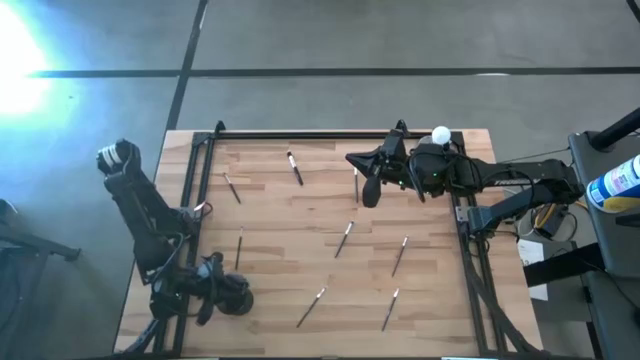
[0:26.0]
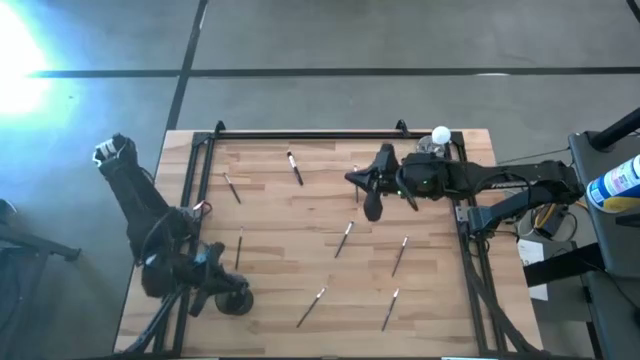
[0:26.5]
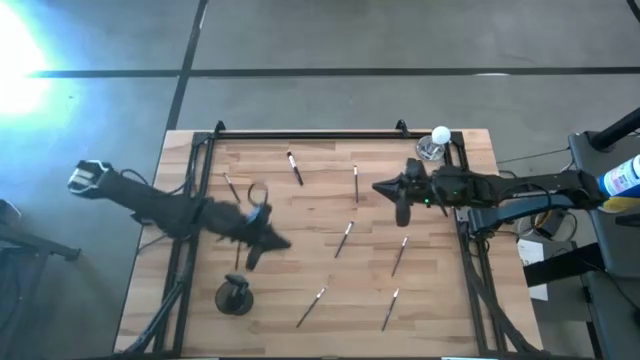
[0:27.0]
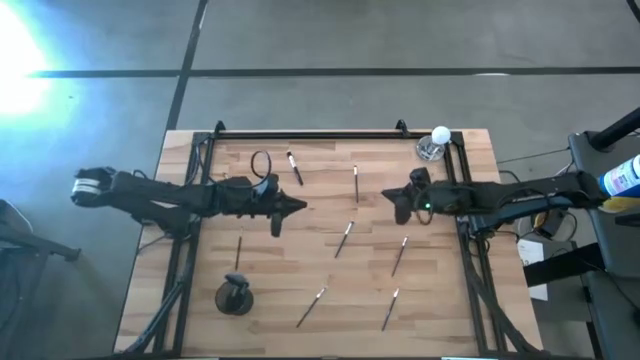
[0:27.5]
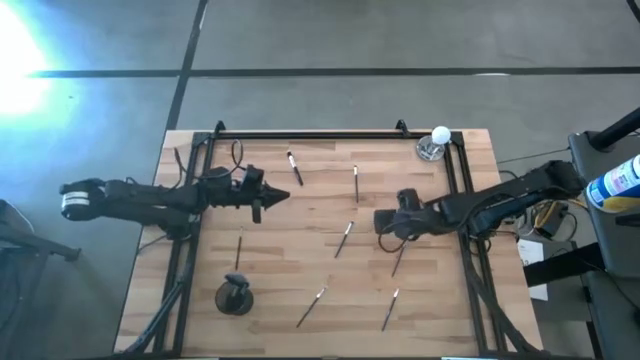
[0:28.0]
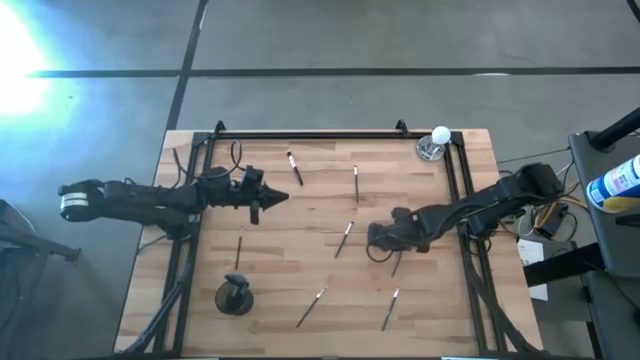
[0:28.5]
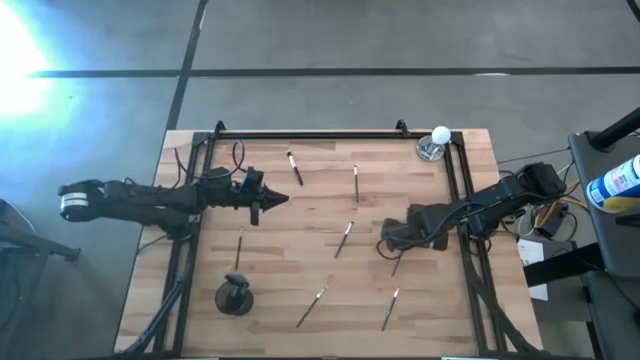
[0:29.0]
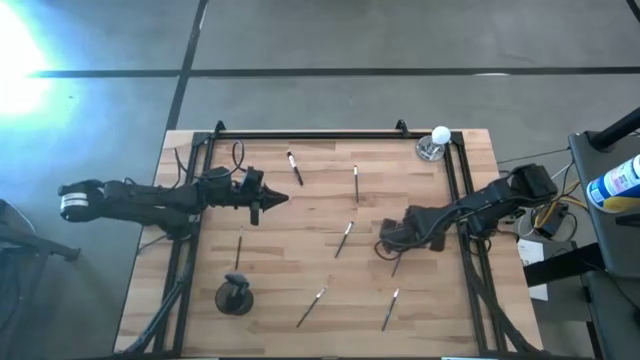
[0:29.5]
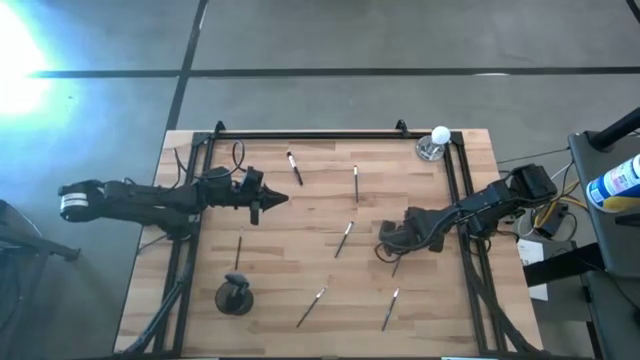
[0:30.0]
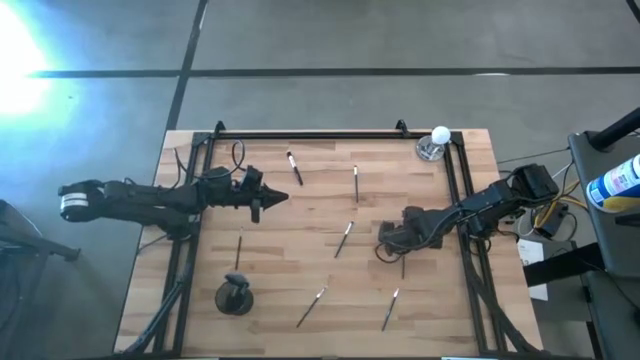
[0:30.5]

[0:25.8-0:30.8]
Task: Pick & Place Makeup Brushes
Put the eyeshadow brush into the holder

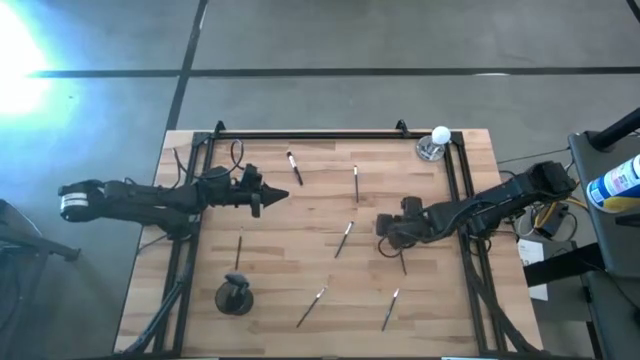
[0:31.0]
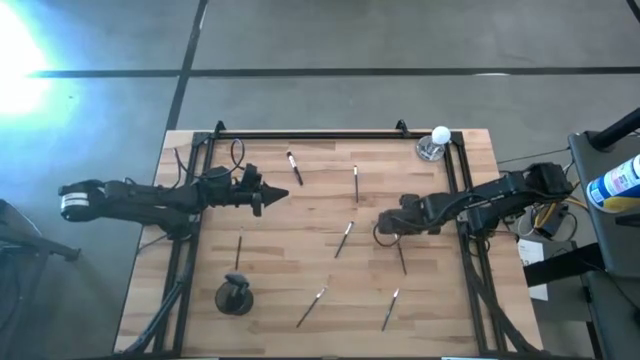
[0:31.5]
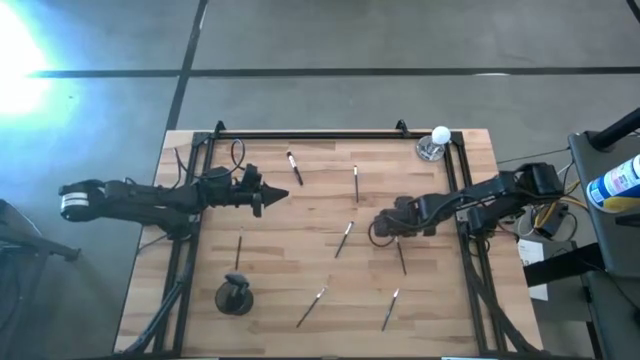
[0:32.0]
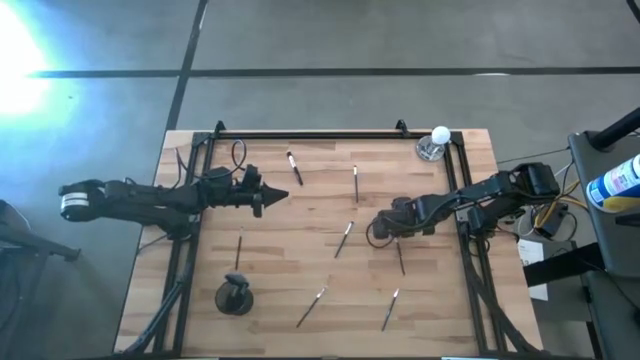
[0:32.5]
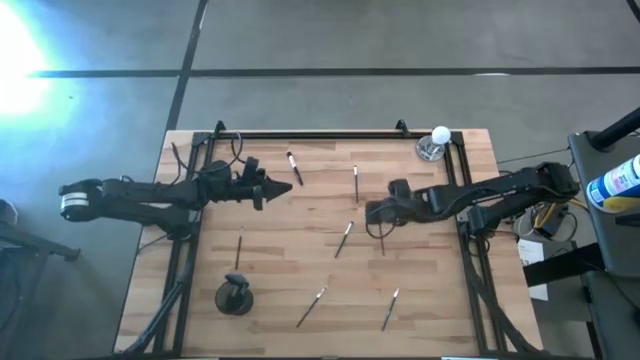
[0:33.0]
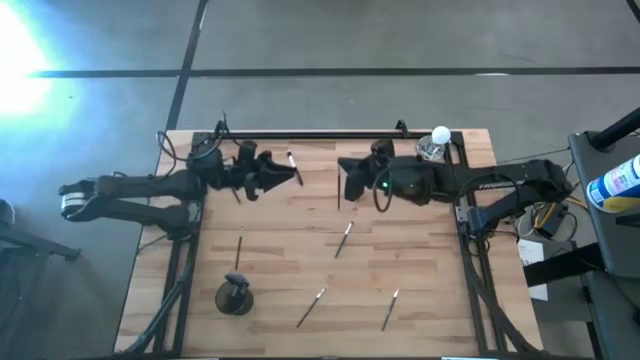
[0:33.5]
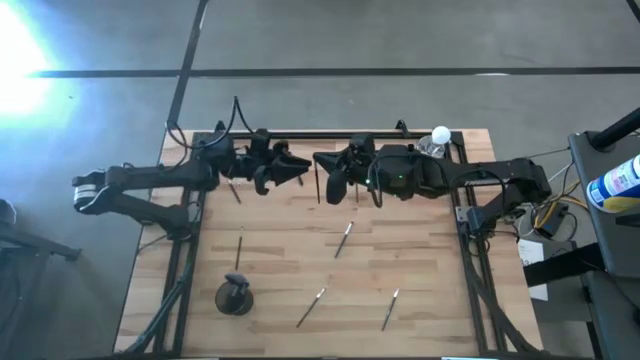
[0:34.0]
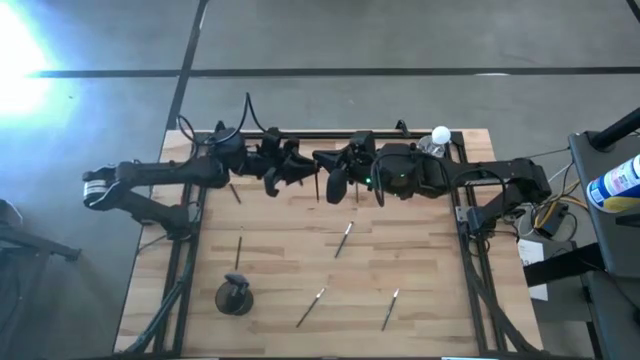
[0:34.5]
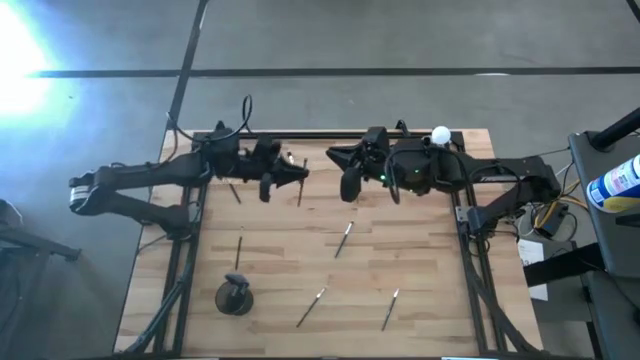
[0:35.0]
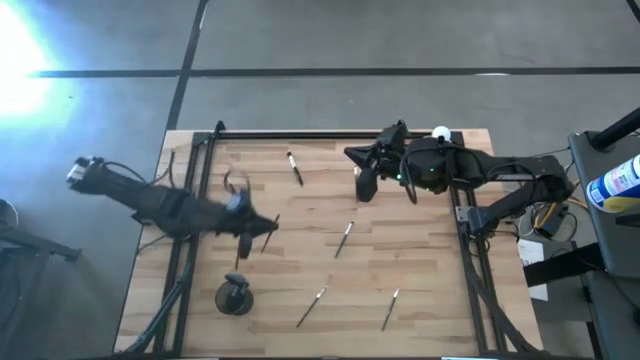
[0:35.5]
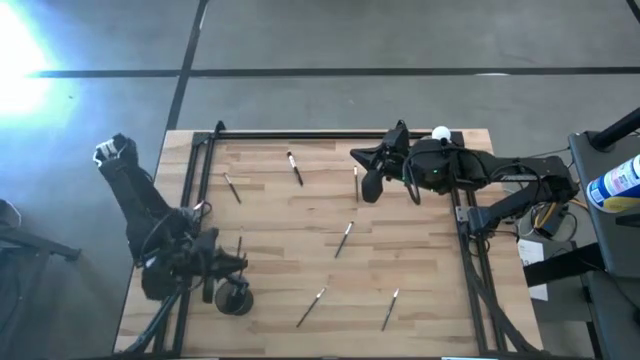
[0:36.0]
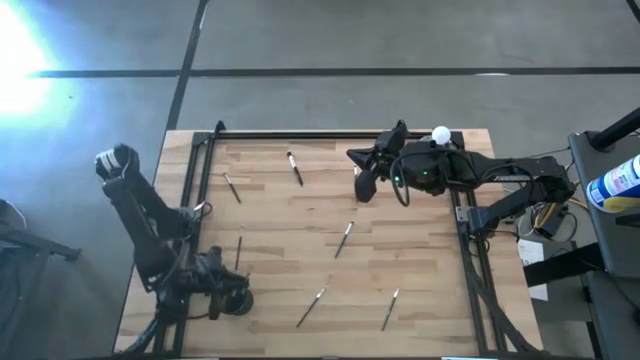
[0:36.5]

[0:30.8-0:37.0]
Put the eyeshadow brush into the holder

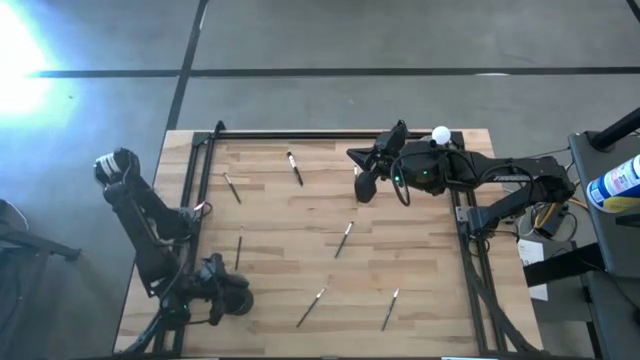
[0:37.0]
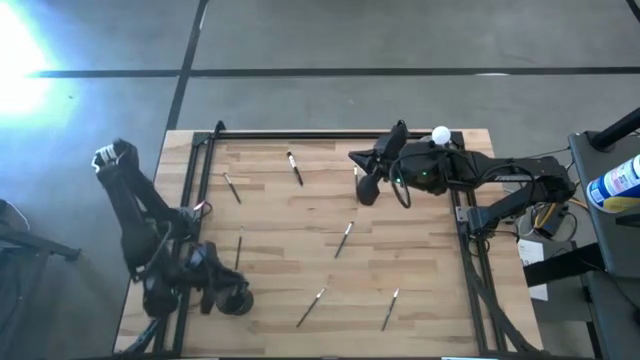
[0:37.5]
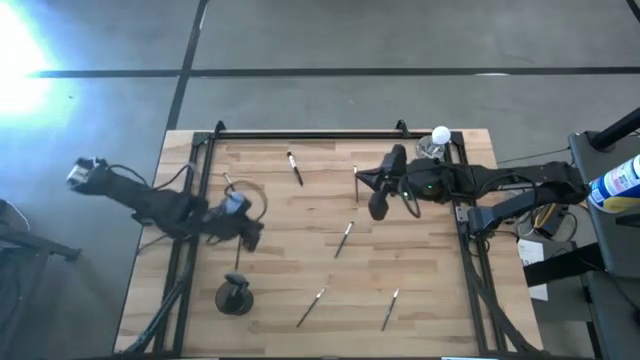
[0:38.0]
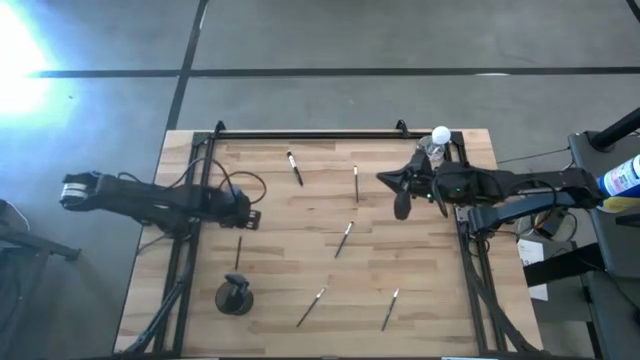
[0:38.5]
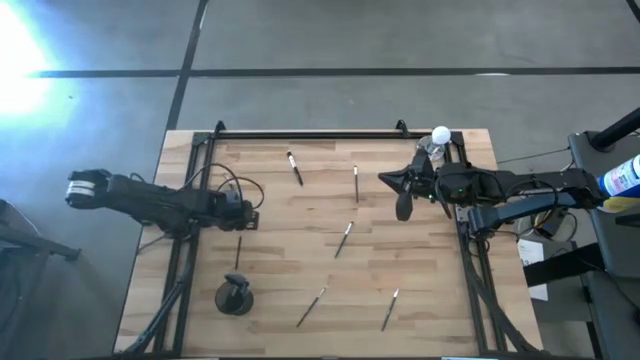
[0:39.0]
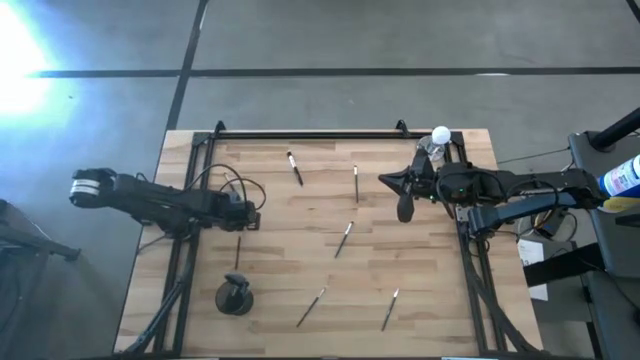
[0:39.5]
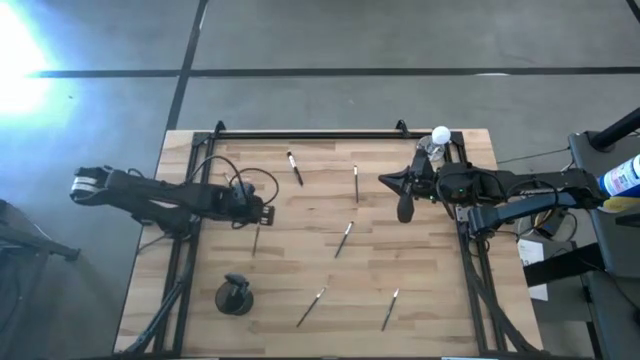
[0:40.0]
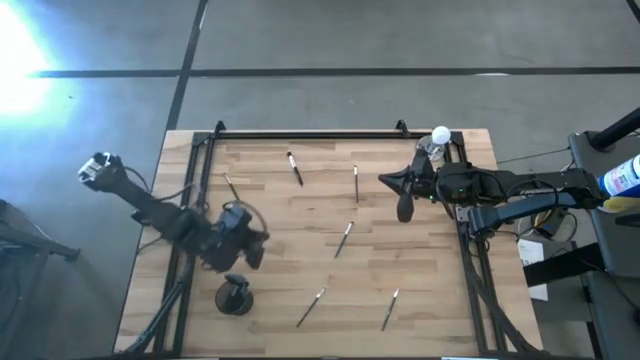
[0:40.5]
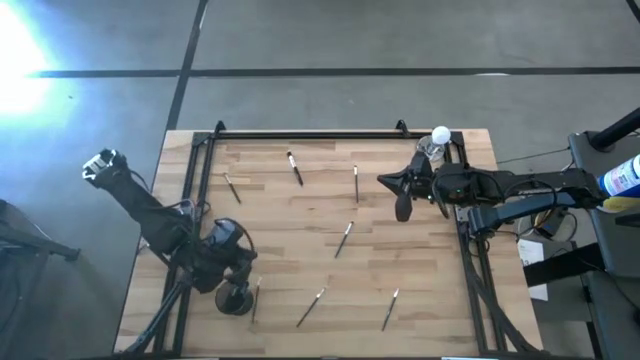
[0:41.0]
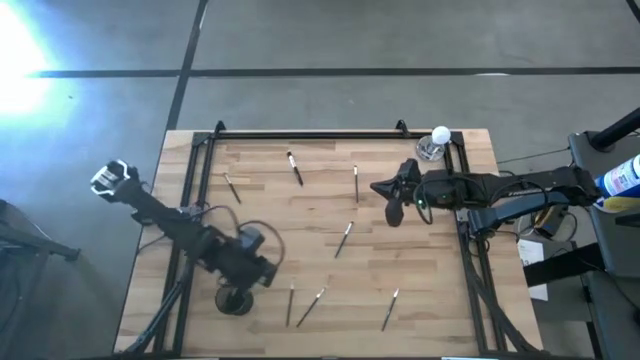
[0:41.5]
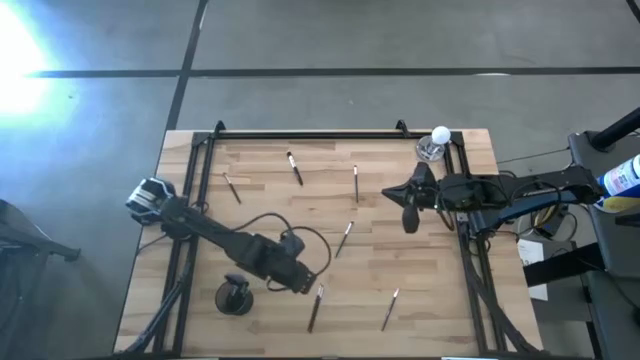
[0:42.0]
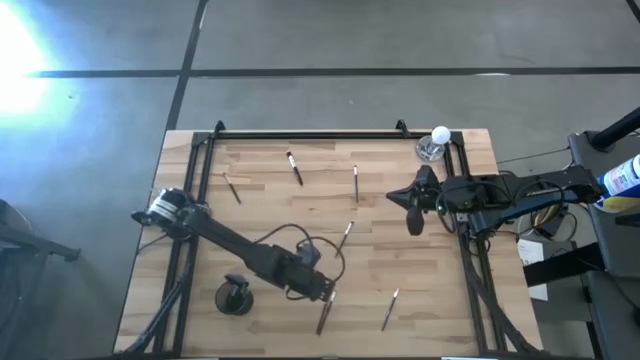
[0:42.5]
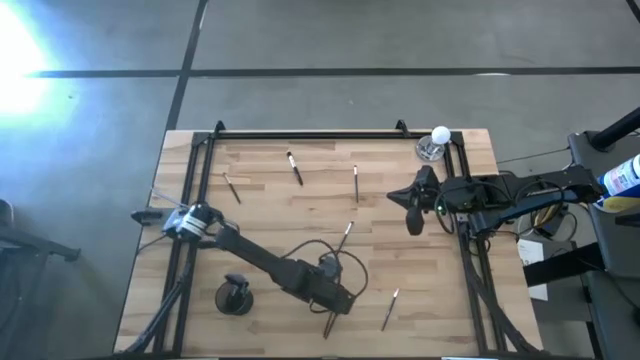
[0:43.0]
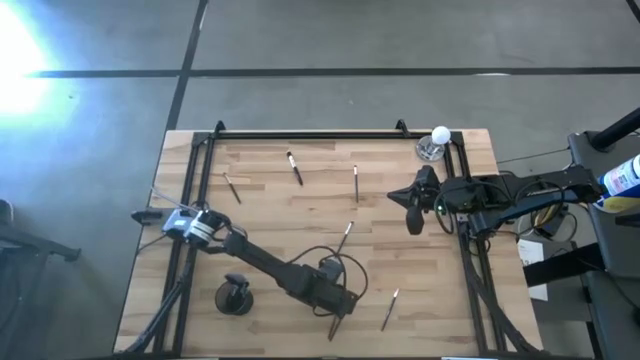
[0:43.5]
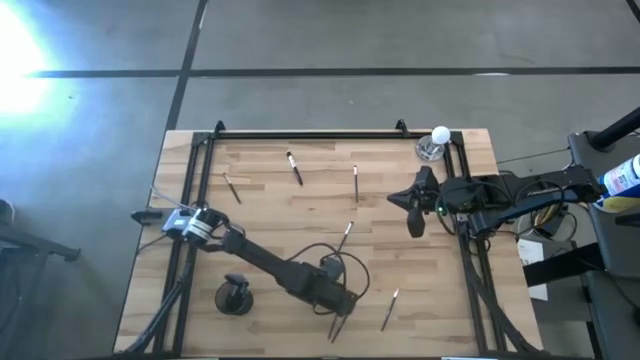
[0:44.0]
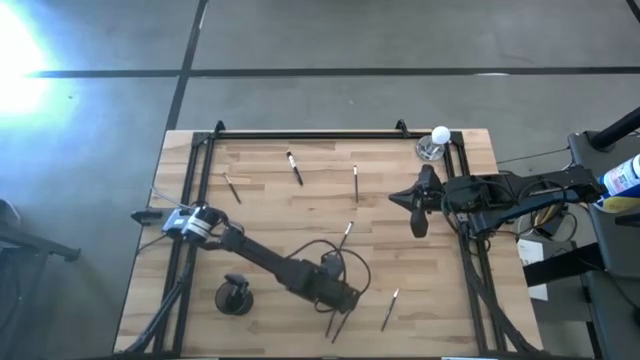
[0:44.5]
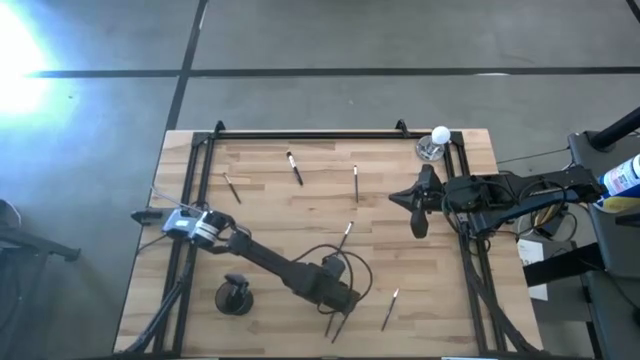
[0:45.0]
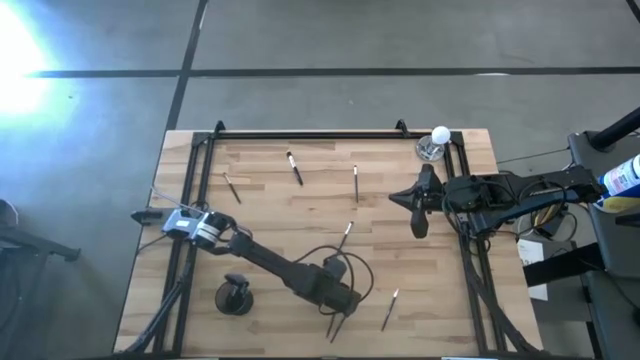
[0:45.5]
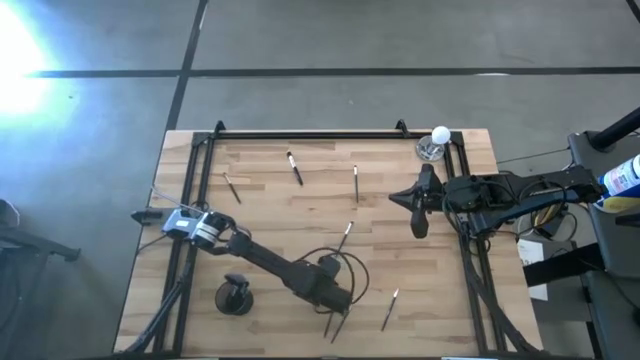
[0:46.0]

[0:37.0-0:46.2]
Put the eyeshadow brush into the holder
